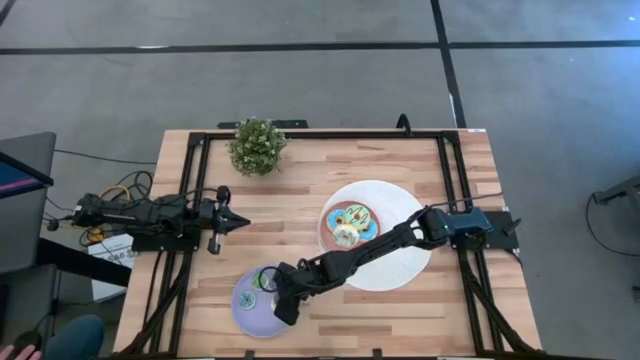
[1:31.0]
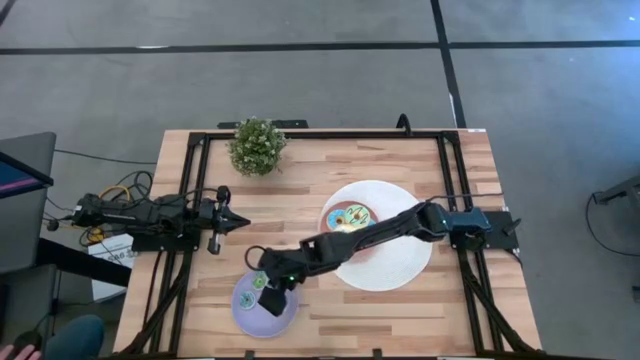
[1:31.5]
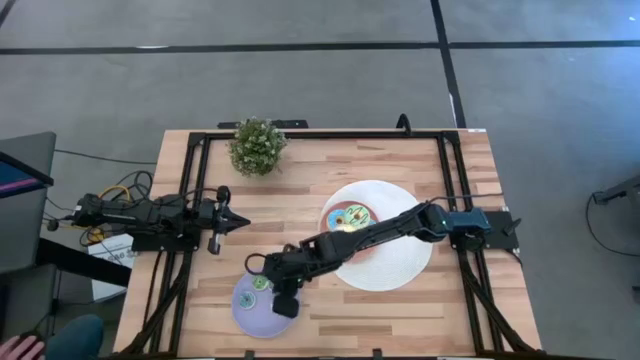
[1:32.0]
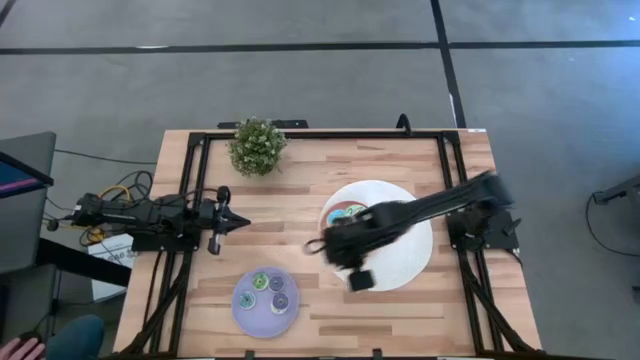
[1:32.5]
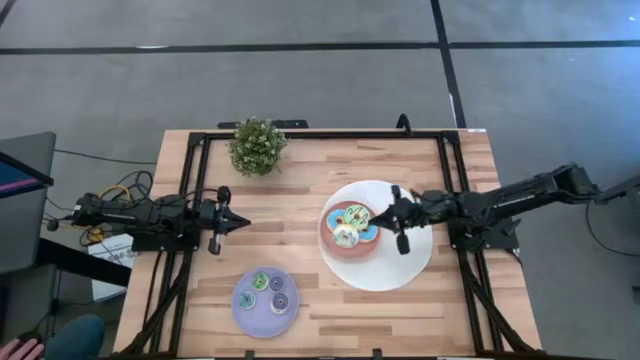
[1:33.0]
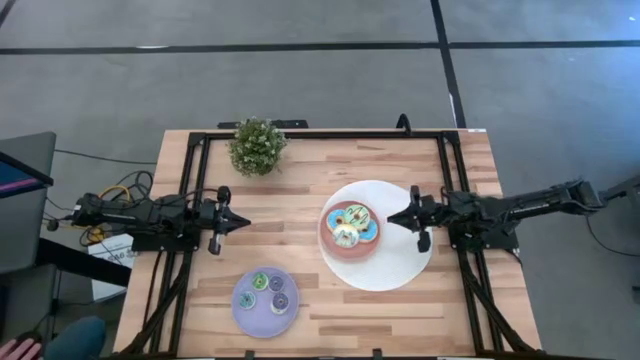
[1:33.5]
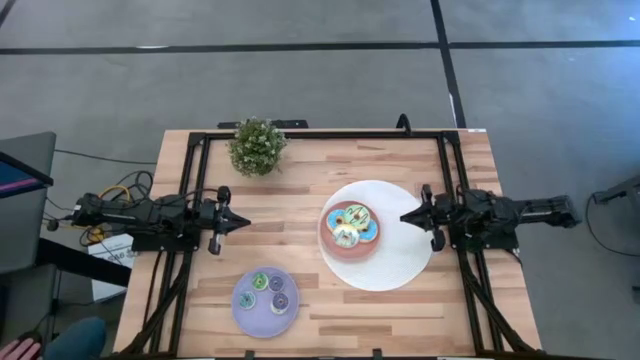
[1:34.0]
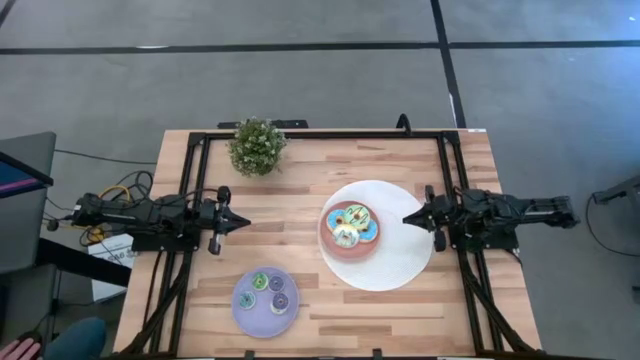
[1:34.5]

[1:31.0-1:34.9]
Task: Pick & Place donuts
Return to Home Position

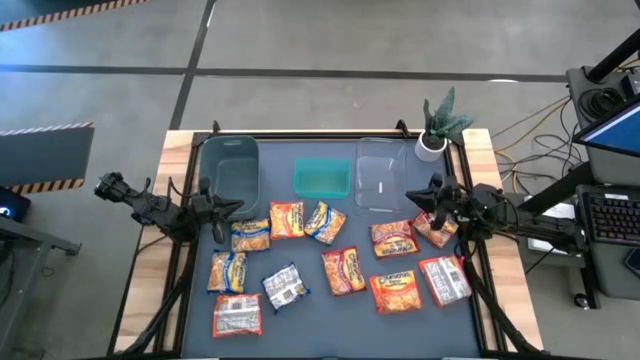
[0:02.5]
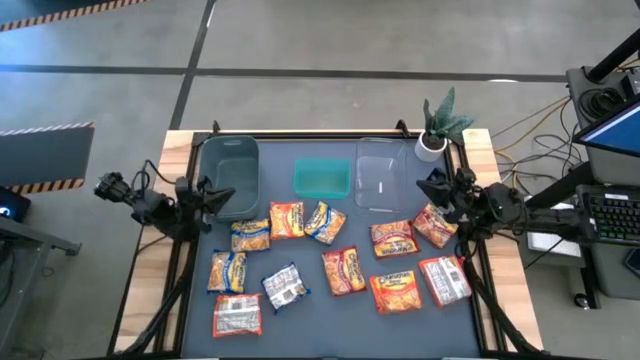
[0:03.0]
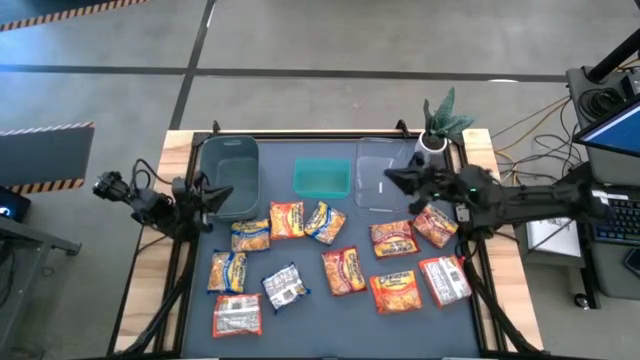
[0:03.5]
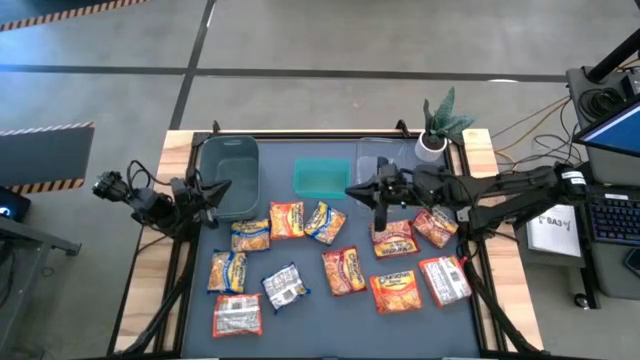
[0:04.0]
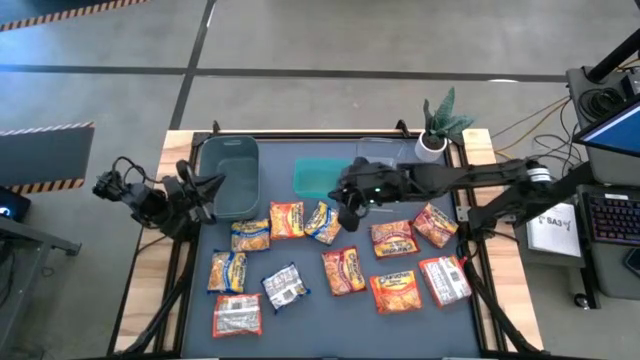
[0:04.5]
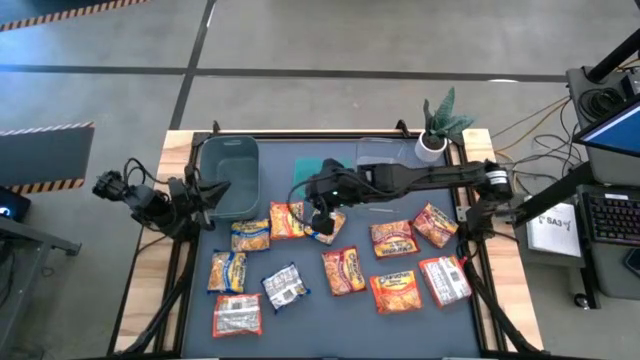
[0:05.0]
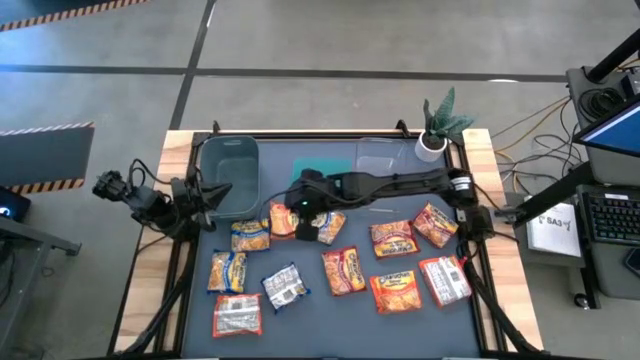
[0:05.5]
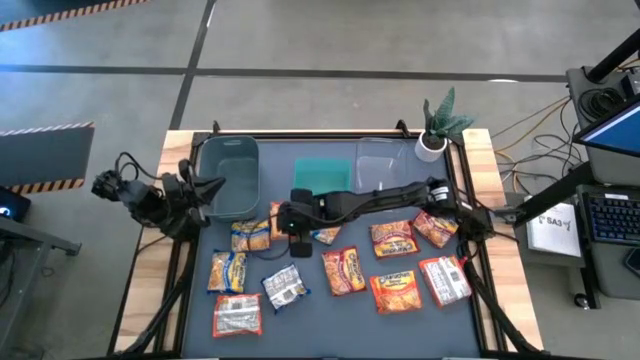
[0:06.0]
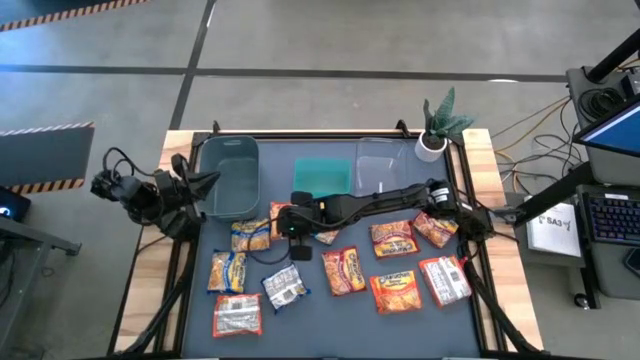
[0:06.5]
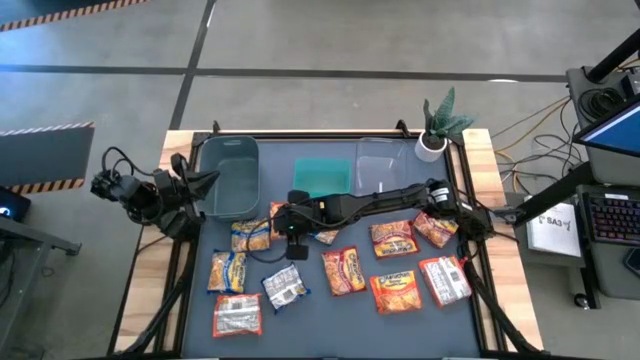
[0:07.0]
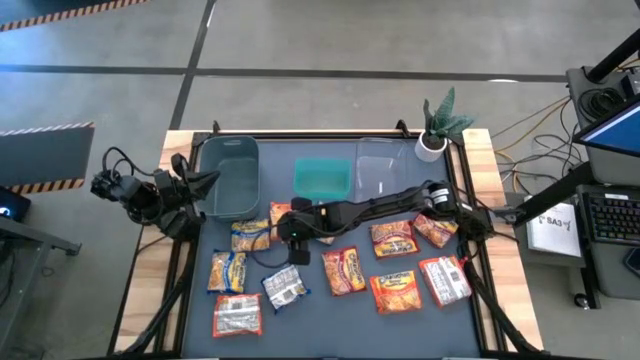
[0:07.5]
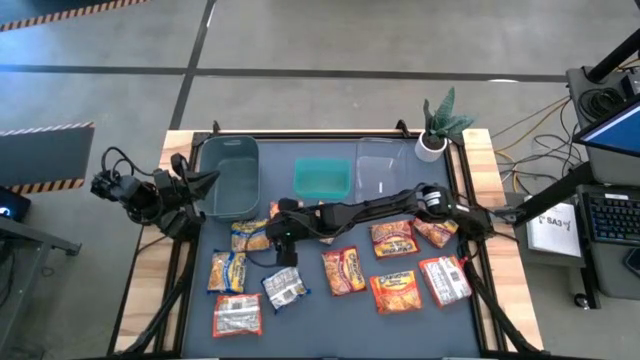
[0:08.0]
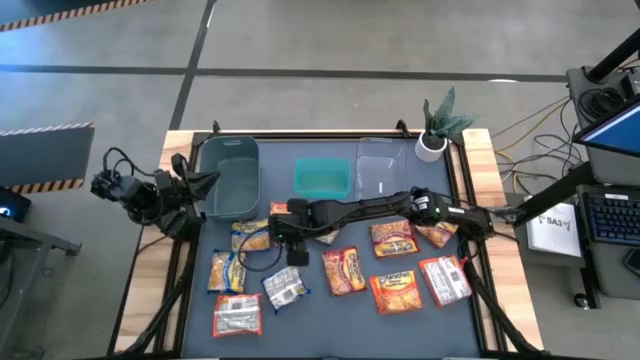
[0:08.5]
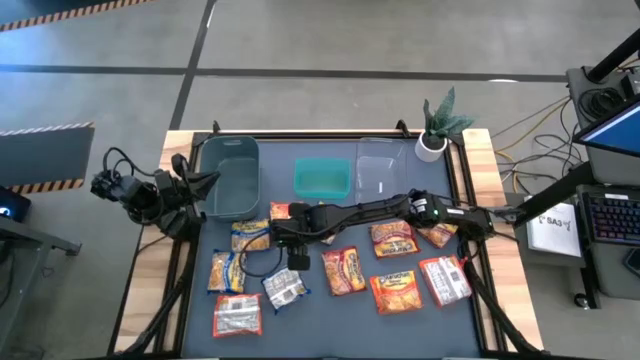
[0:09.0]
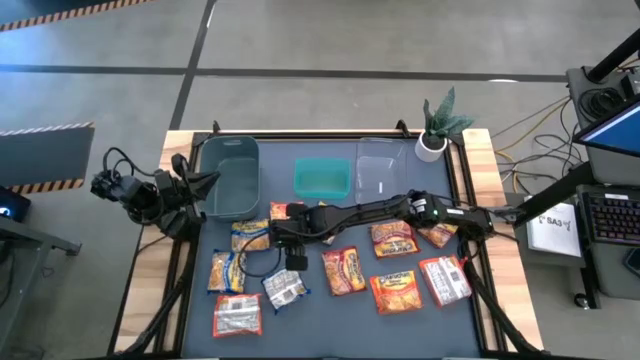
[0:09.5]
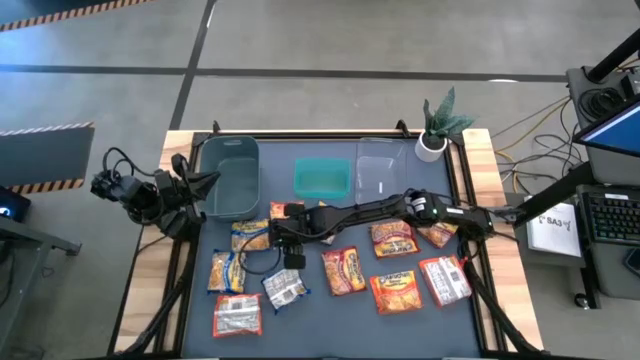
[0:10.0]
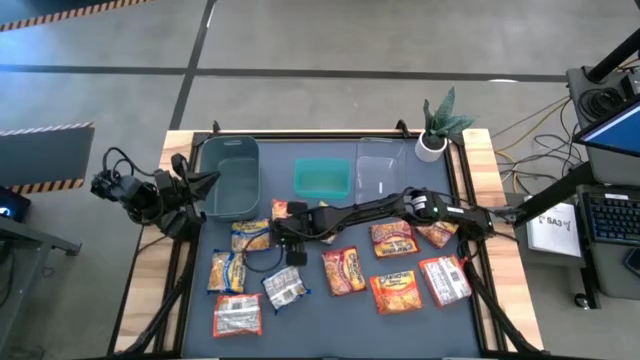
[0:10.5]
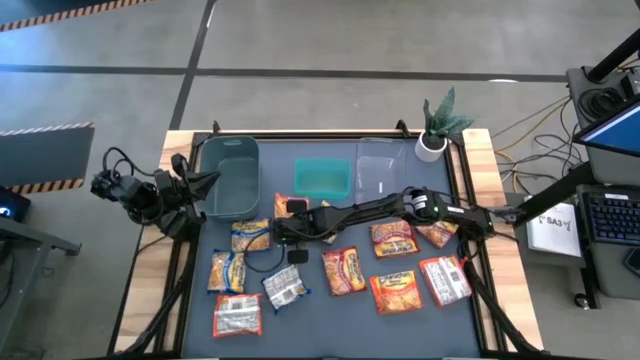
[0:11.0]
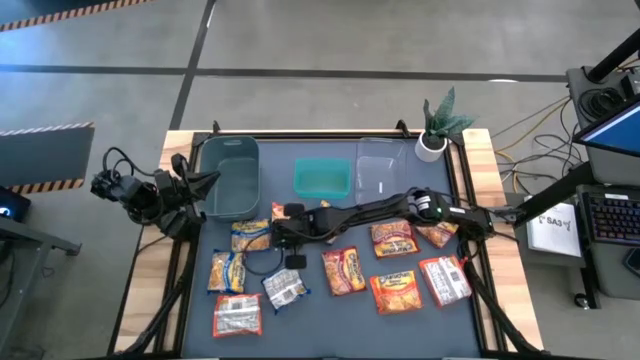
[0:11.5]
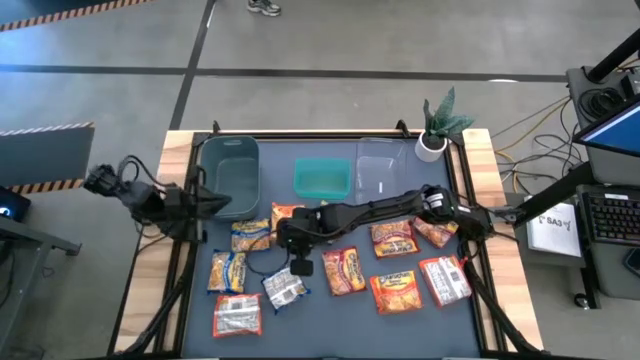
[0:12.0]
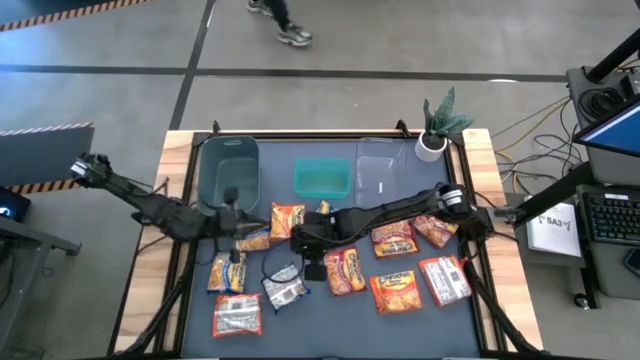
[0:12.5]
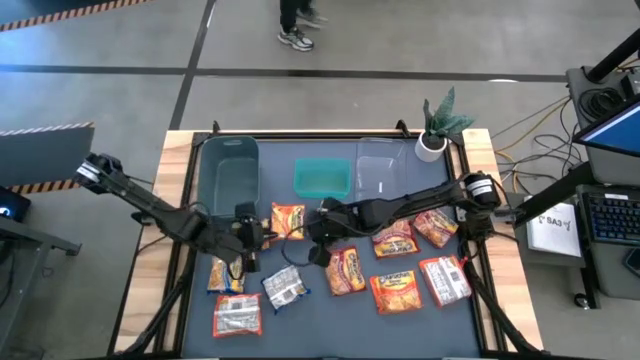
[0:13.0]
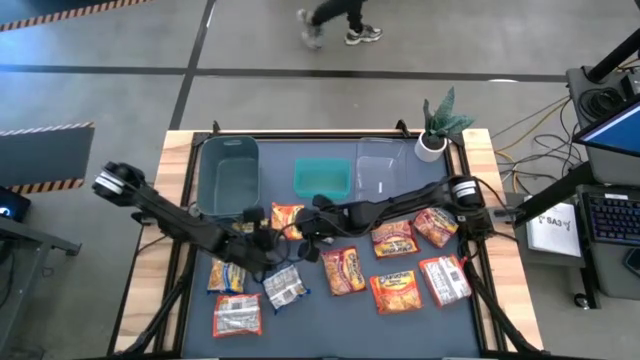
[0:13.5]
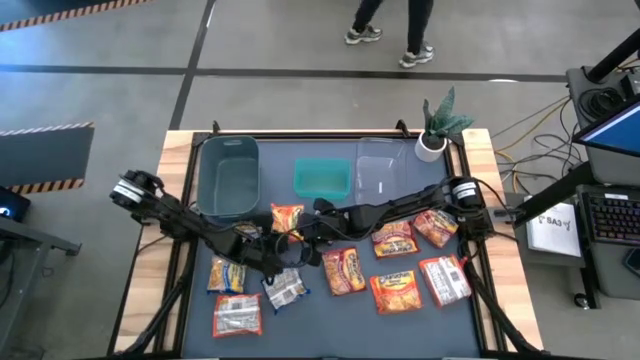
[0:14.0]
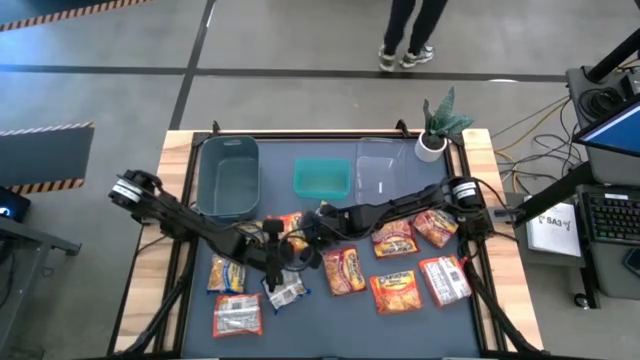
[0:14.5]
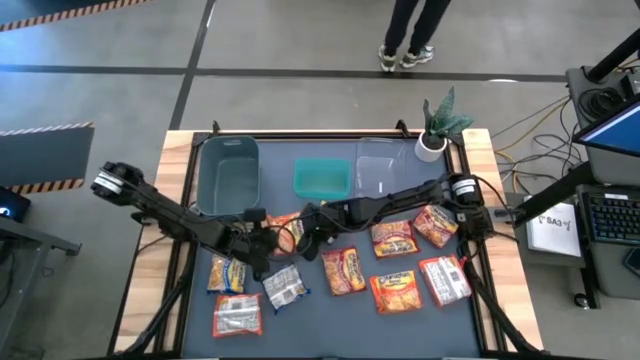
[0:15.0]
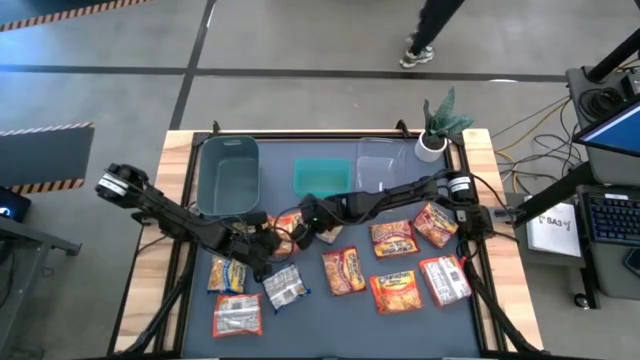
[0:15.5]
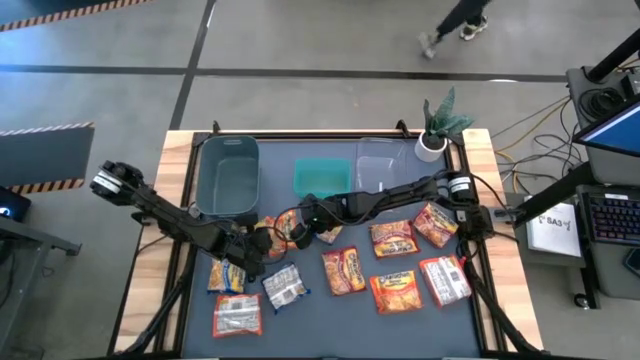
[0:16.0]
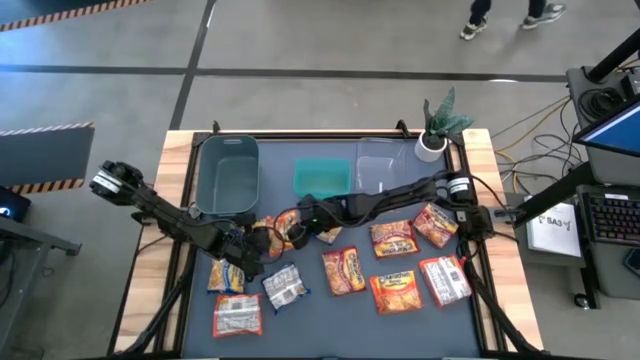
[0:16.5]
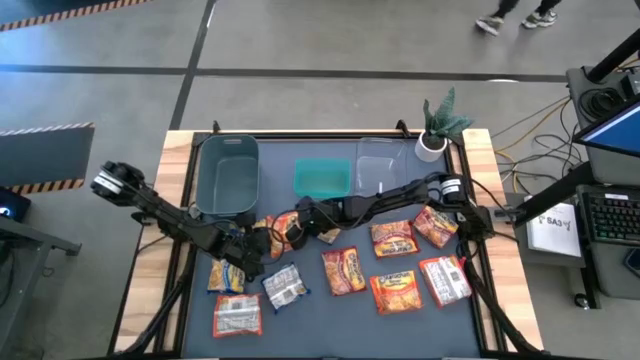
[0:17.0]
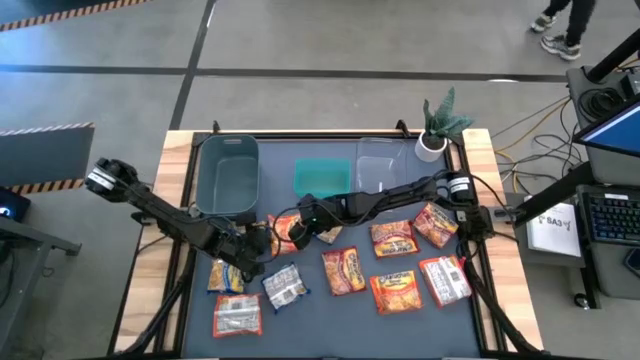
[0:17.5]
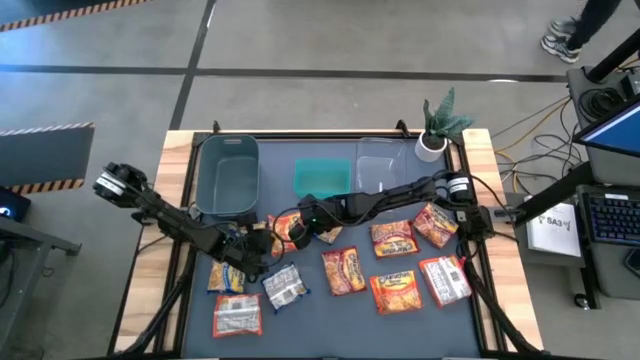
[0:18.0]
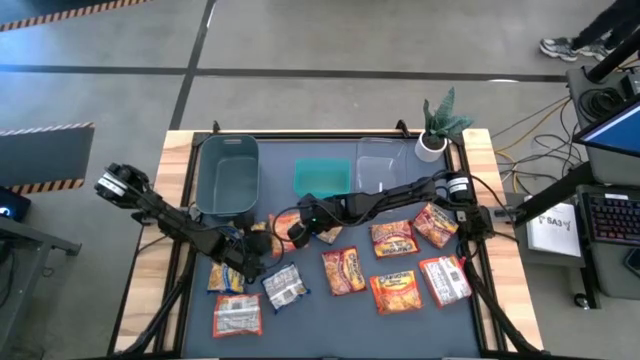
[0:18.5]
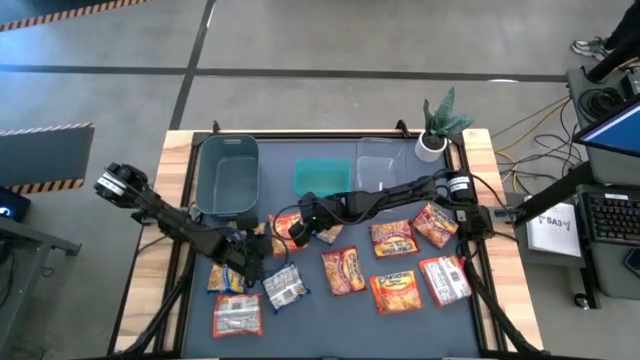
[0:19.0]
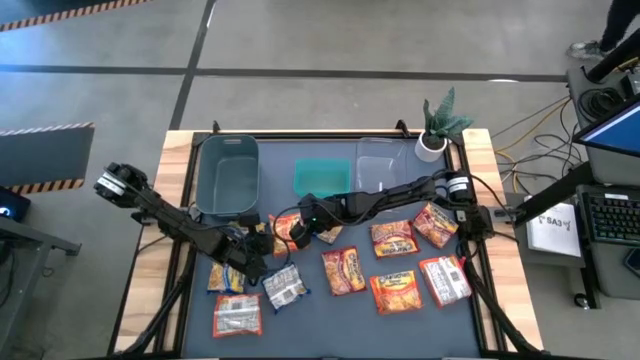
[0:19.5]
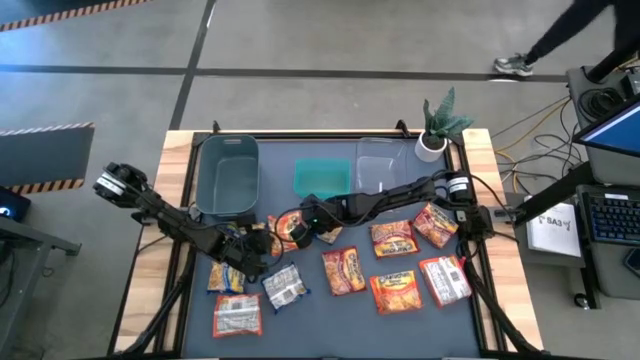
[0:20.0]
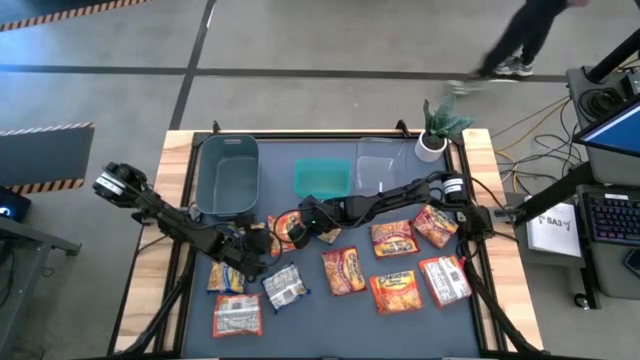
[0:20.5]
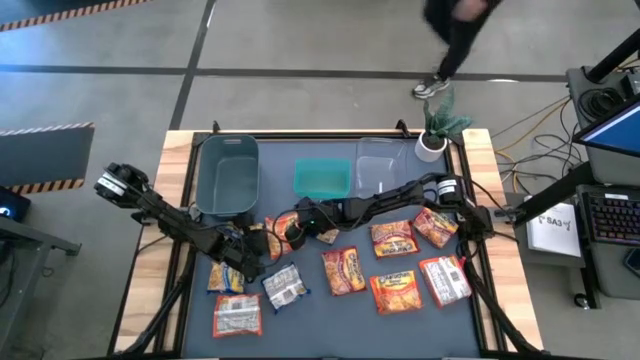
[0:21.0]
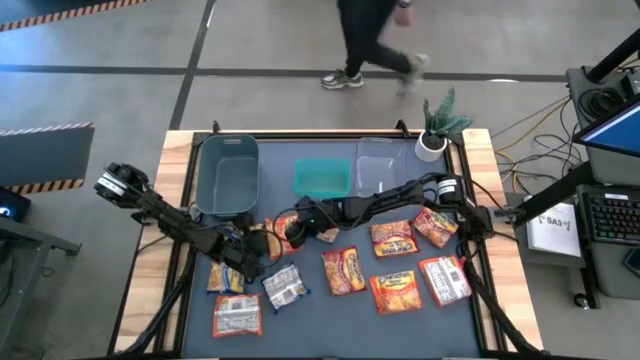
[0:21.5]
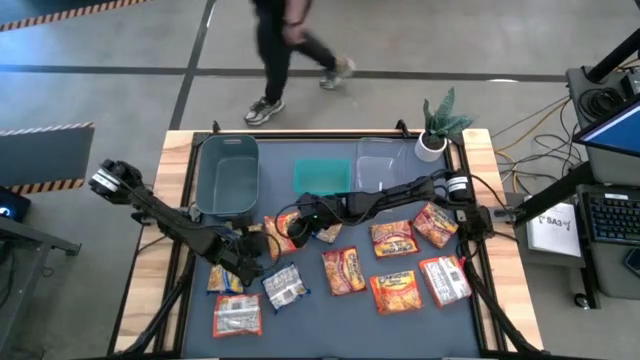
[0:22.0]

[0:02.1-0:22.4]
Task: Sort Maruchan noodles
Put the orange noodle pack into the transparent bin
